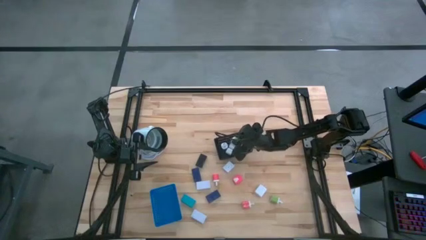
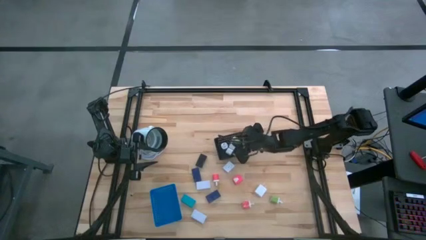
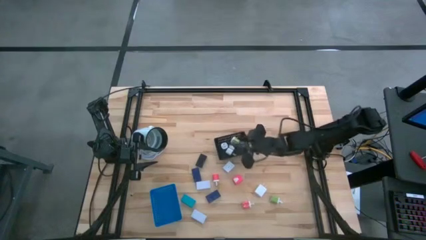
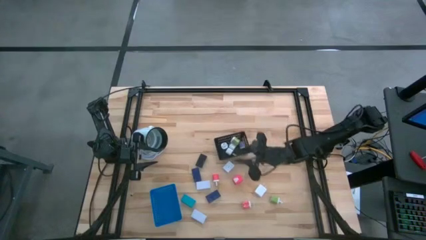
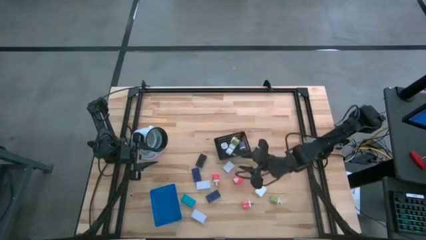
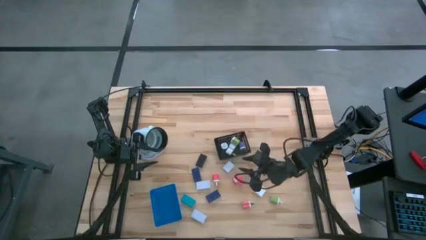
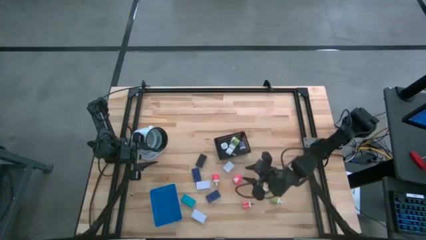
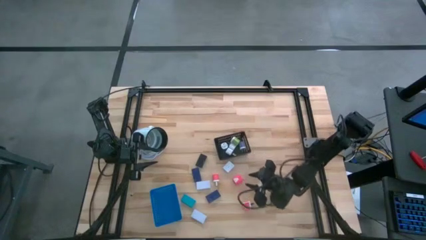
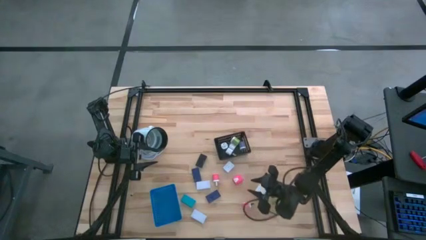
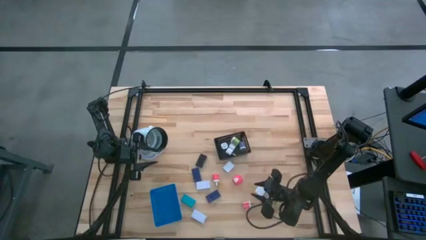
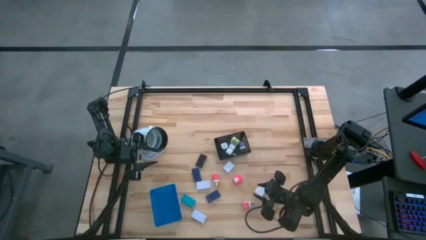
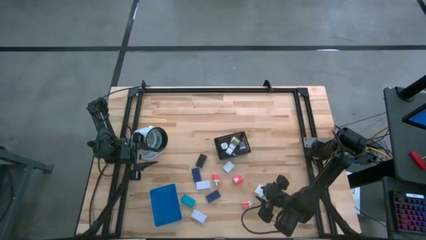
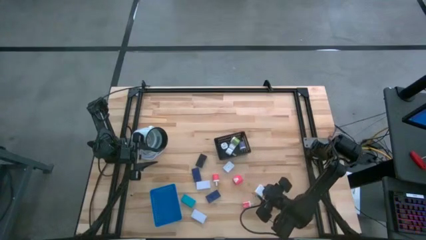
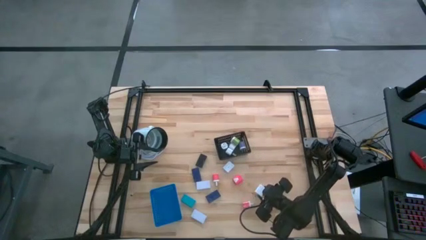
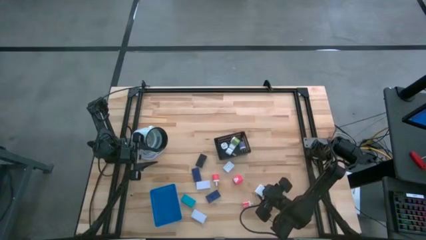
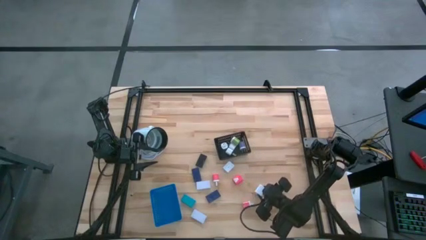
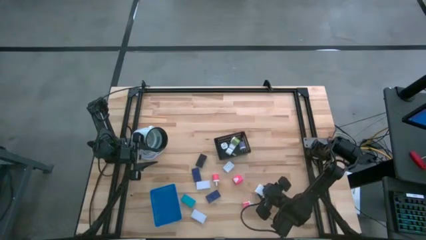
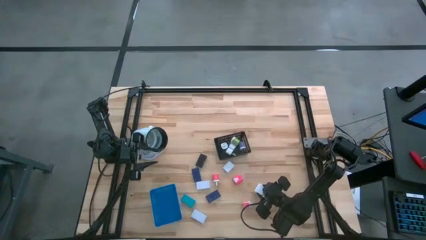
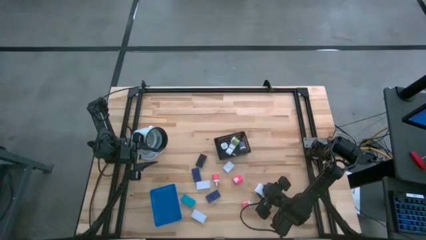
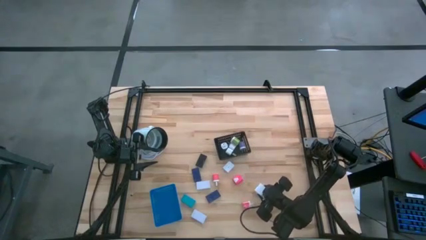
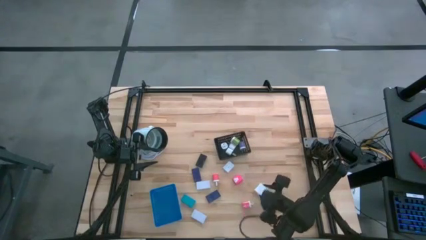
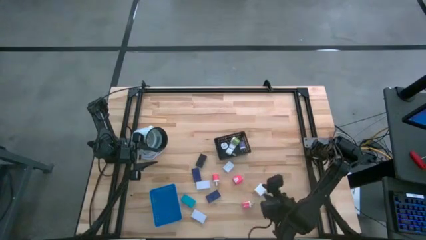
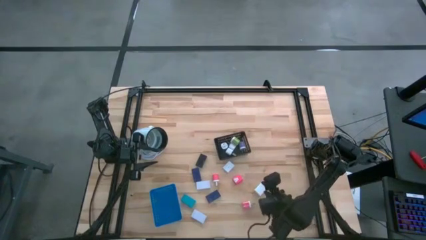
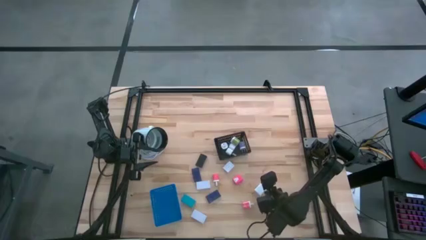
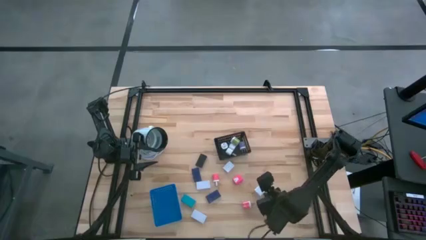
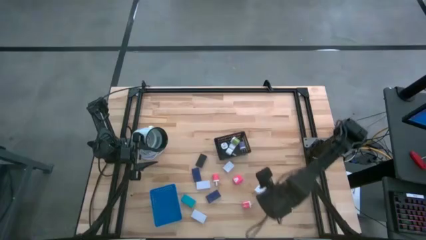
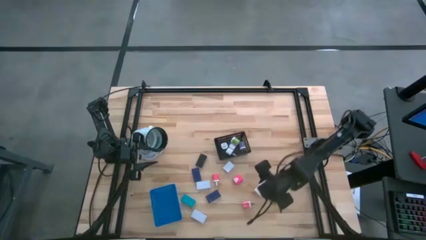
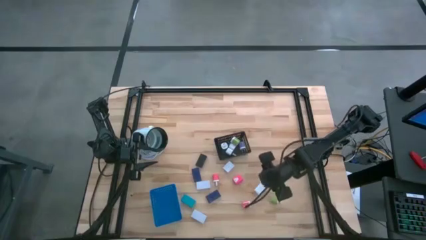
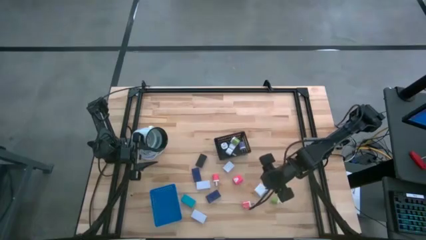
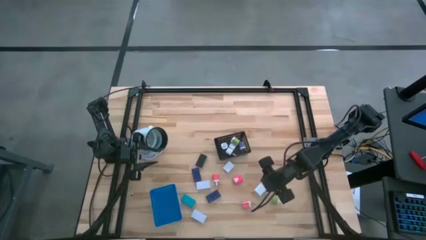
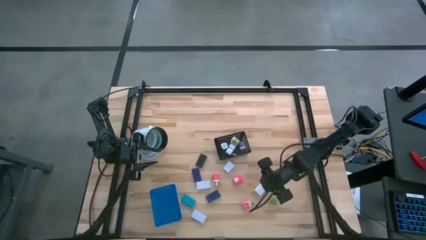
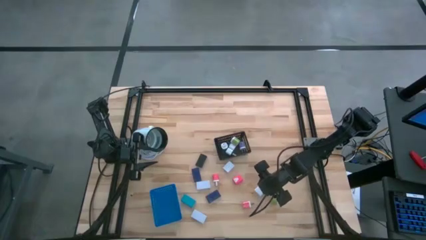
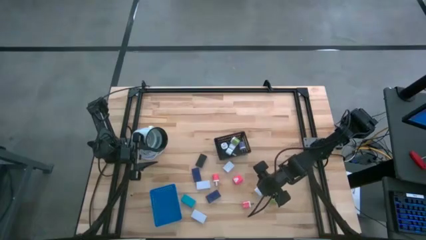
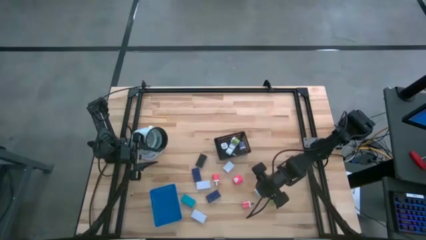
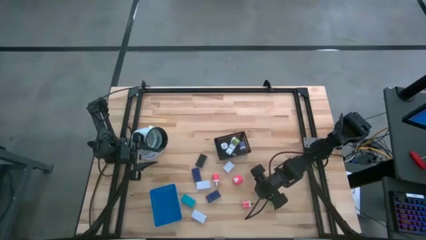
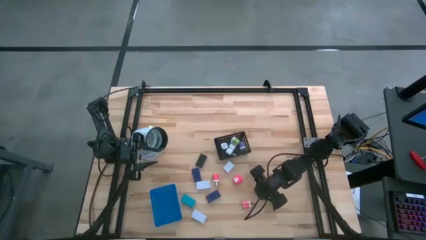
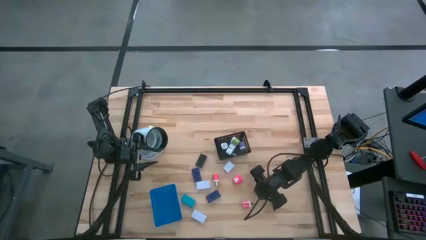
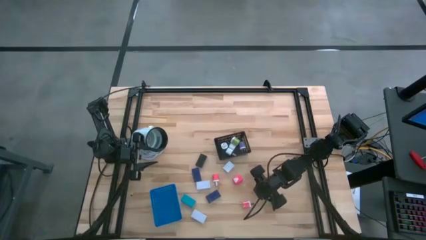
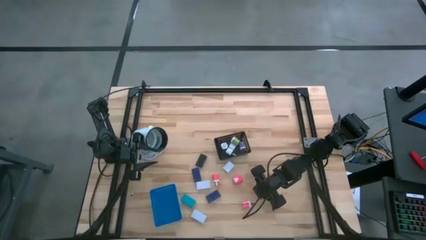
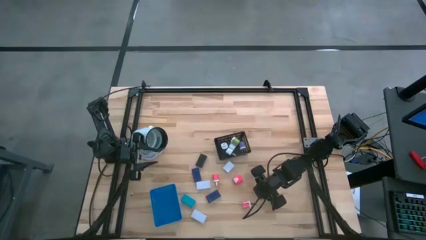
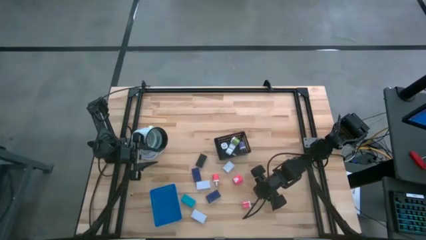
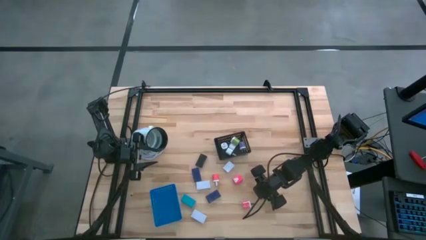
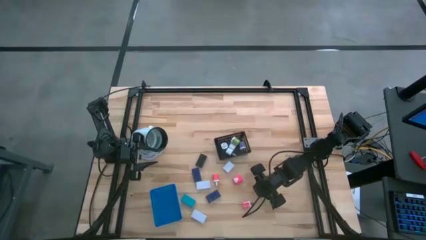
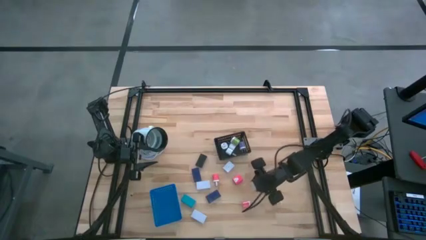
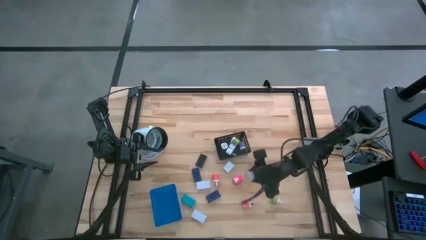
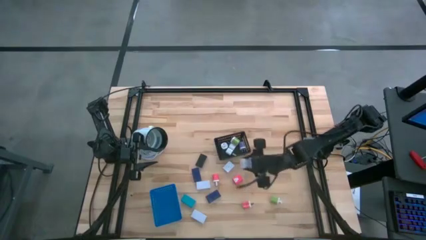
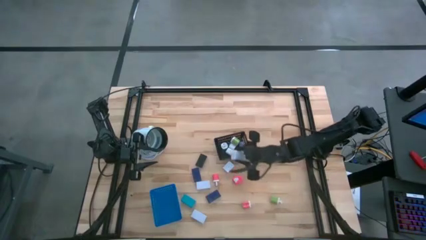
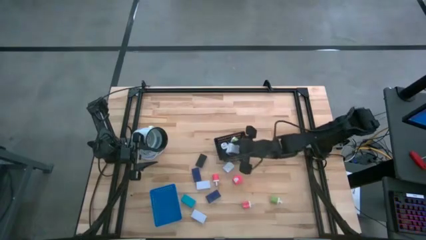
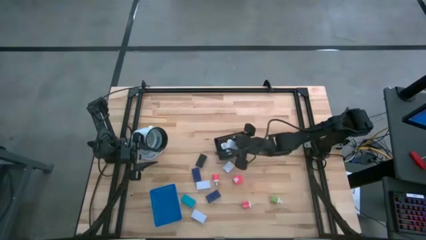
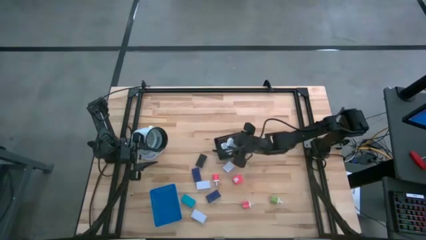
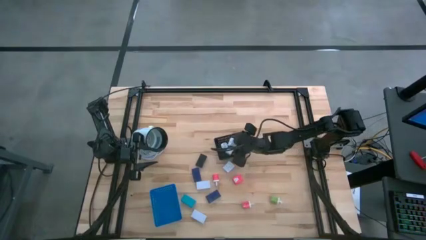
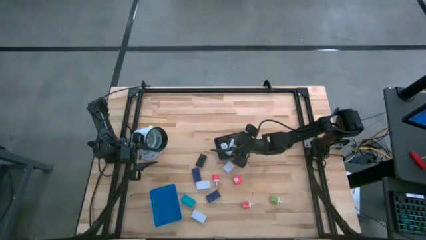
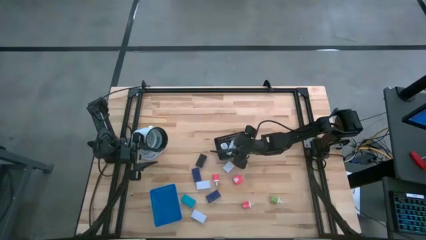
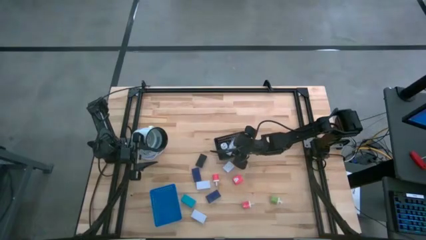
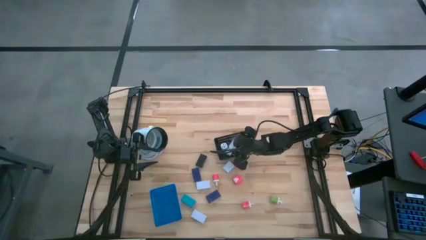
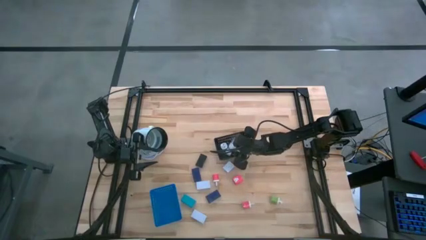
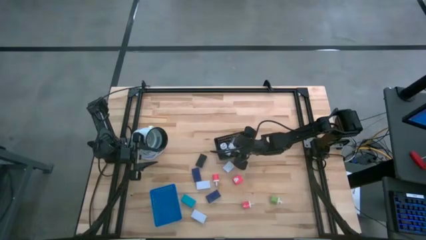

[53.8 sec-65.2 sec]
Task: Pick & Place Office items
Put the bottom white charger adapter into the black bin

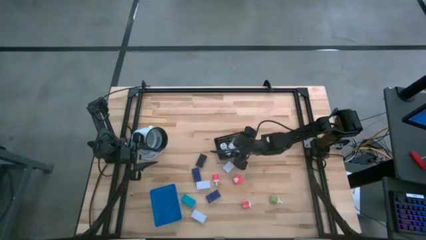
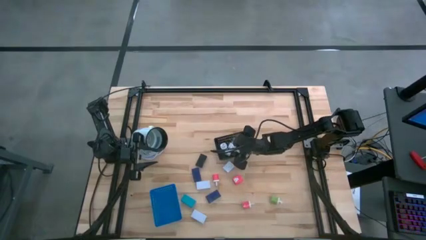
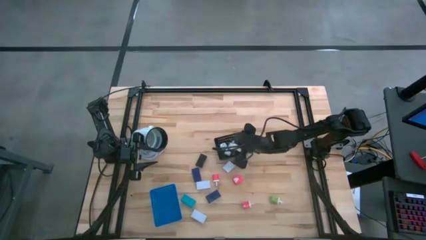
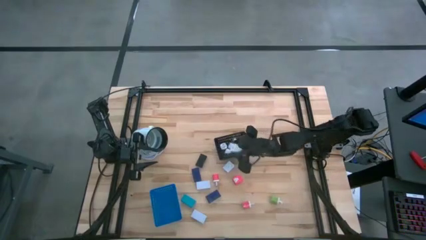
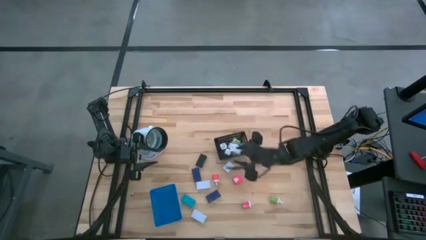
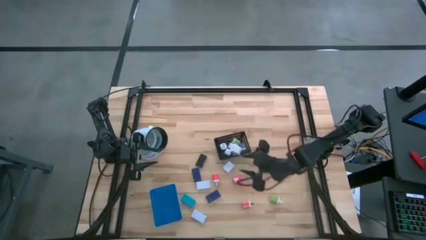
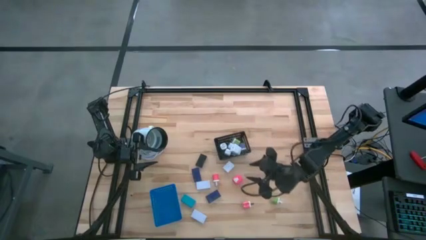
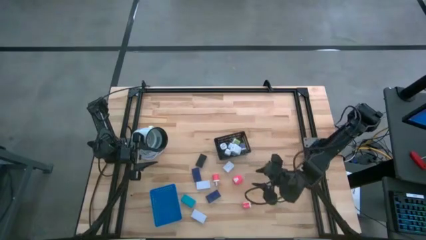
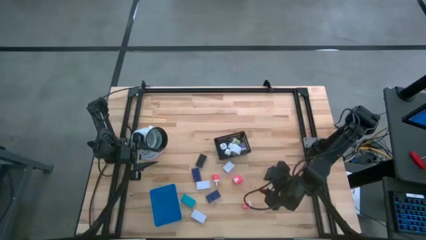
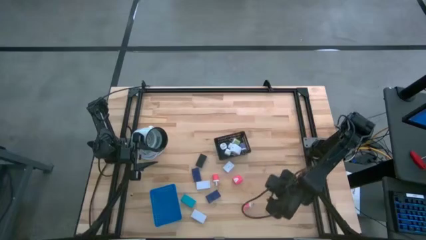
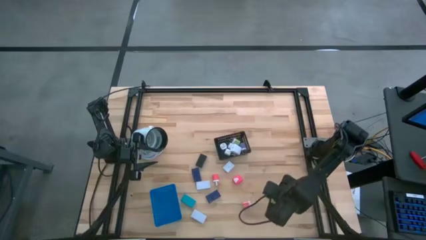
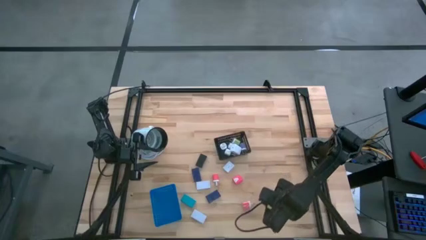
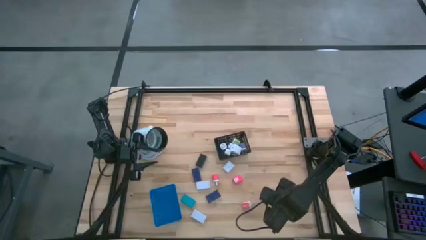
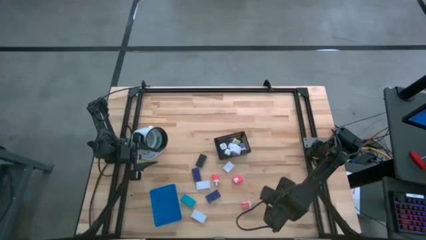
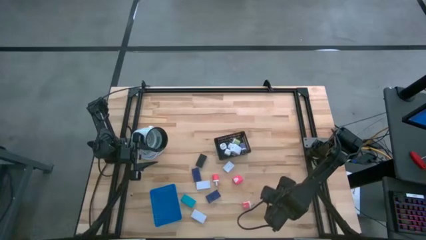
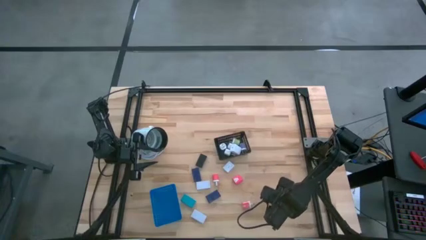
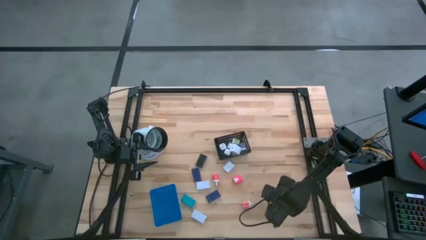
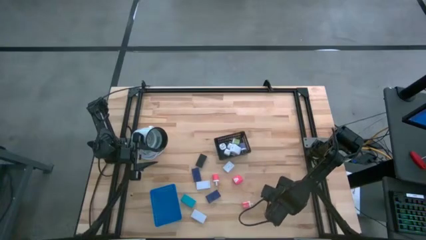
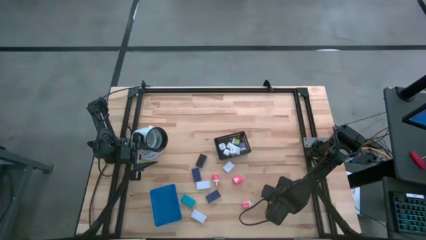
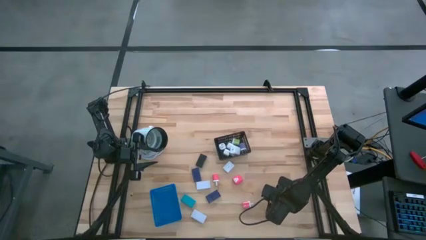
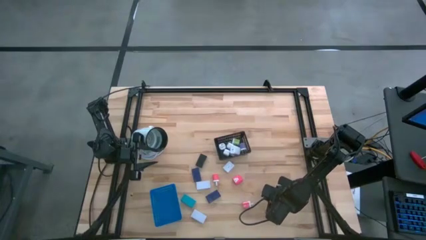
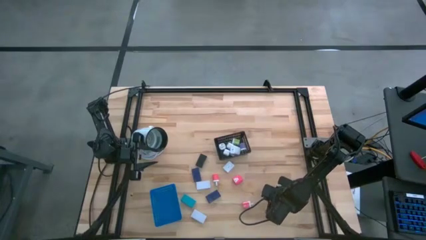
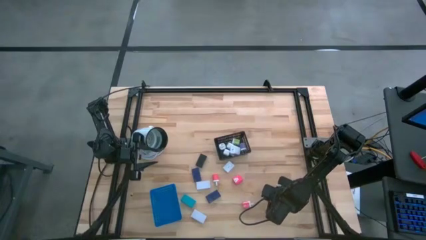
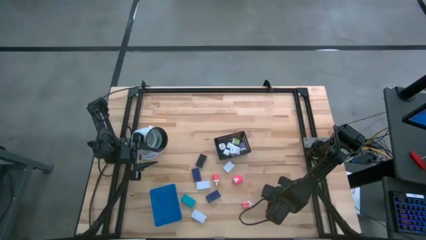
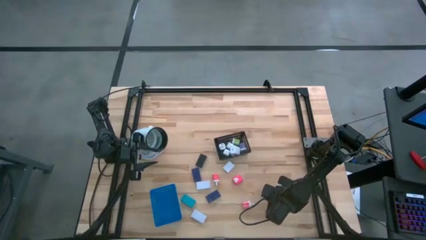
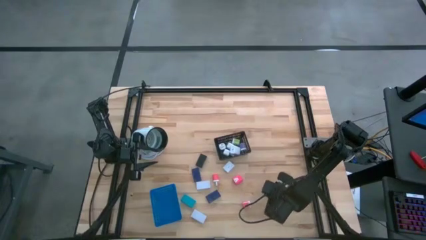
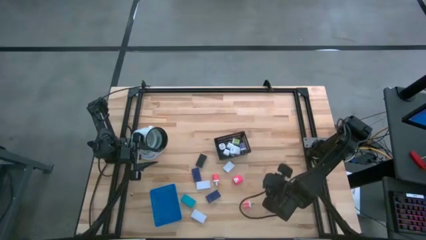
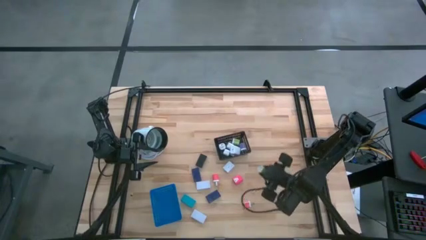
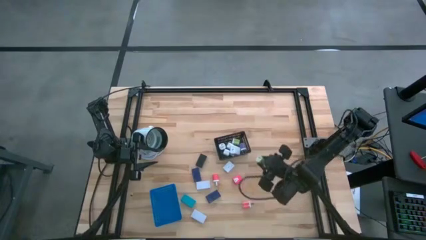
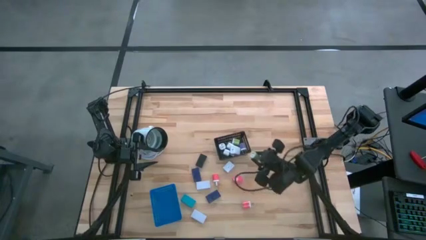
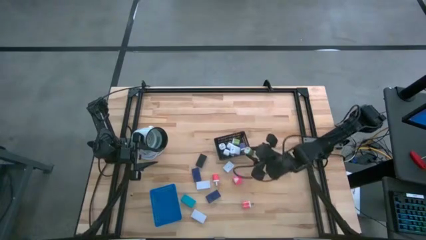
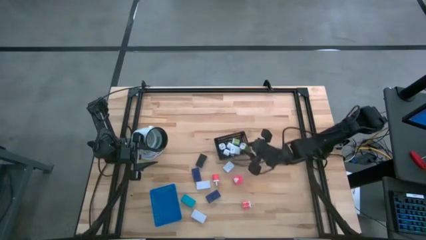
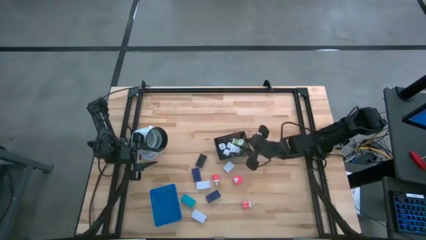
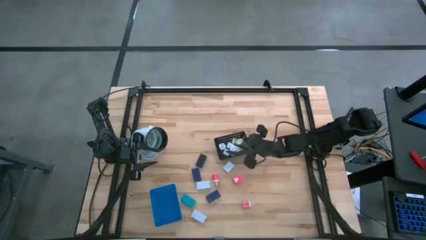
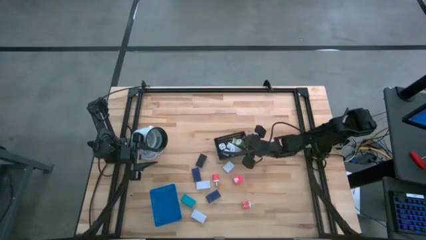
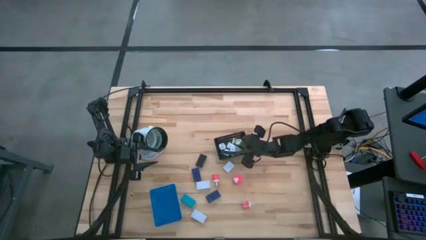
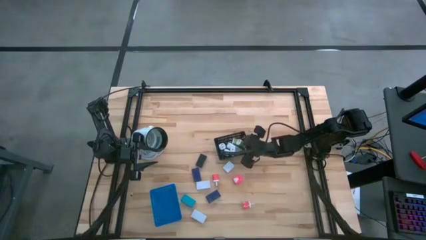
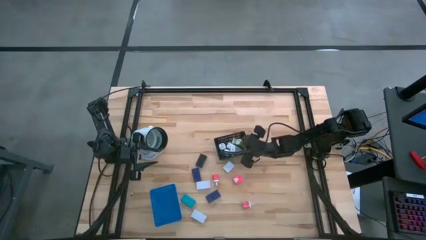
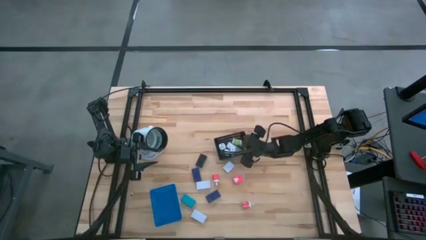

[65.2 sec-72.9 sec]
Put the green charger adapter into the black bin
